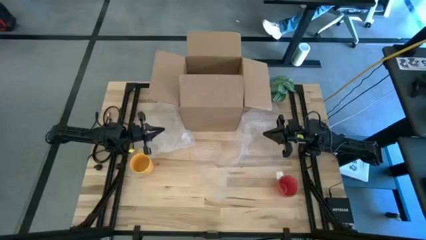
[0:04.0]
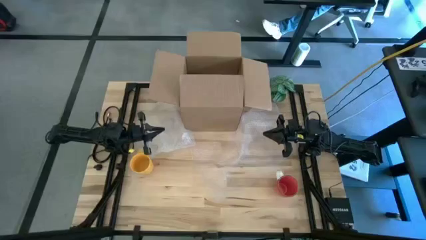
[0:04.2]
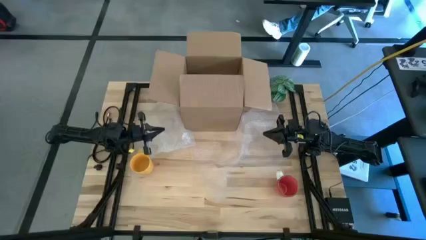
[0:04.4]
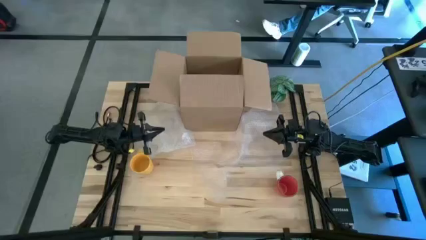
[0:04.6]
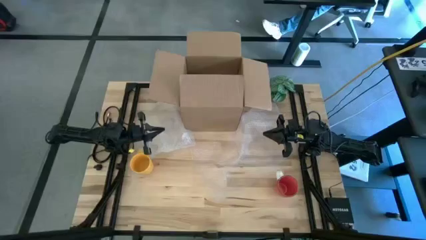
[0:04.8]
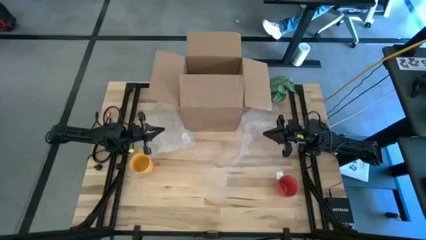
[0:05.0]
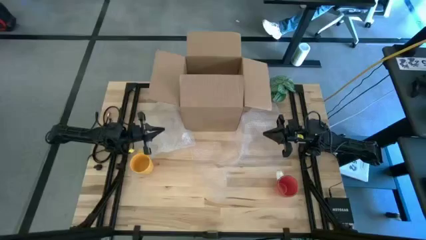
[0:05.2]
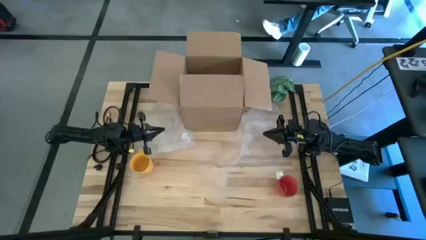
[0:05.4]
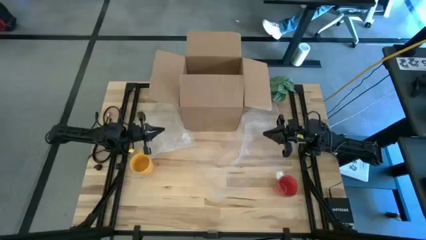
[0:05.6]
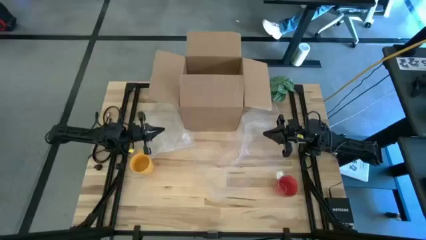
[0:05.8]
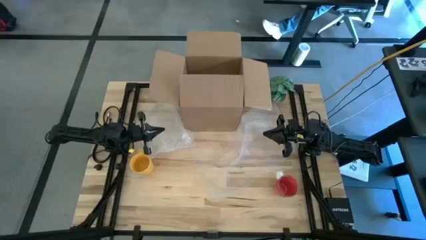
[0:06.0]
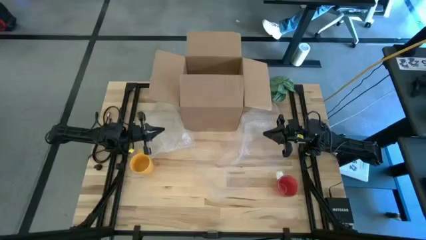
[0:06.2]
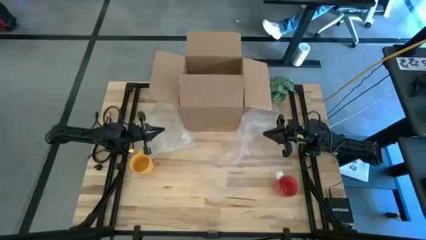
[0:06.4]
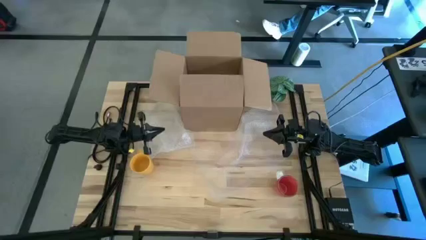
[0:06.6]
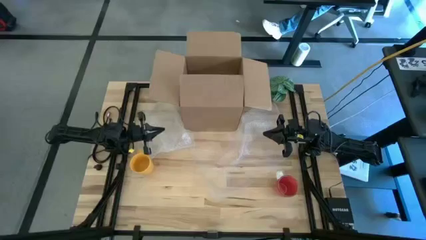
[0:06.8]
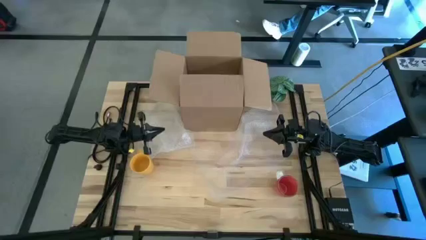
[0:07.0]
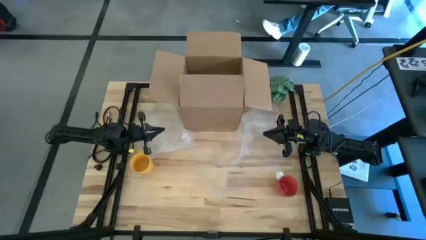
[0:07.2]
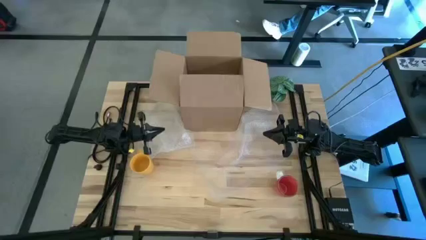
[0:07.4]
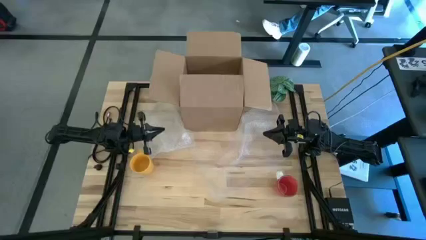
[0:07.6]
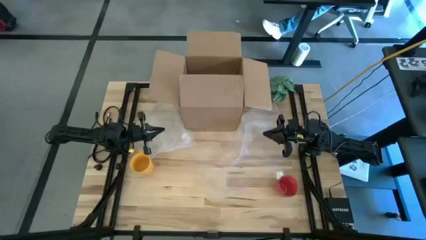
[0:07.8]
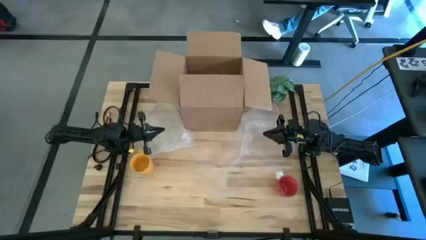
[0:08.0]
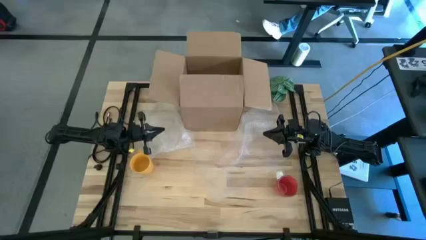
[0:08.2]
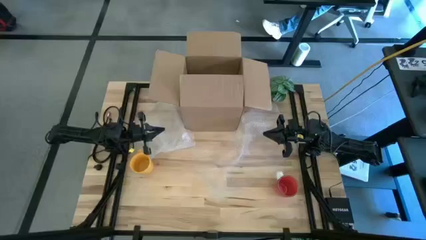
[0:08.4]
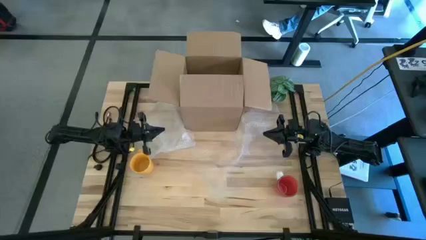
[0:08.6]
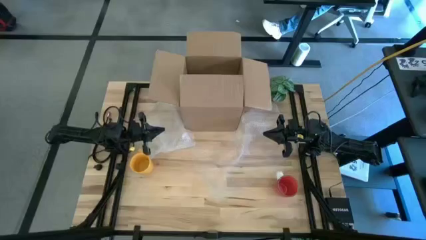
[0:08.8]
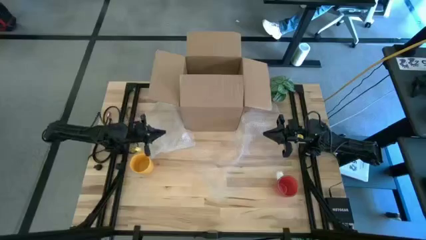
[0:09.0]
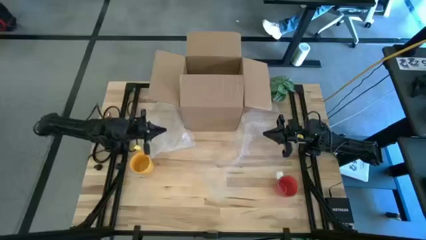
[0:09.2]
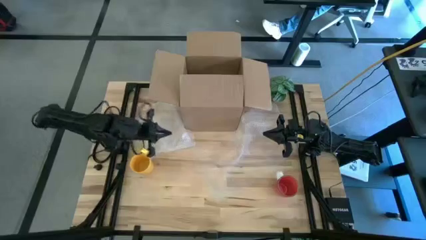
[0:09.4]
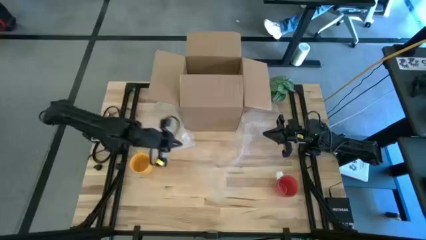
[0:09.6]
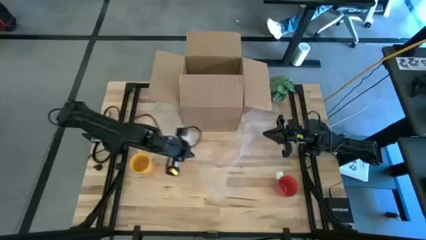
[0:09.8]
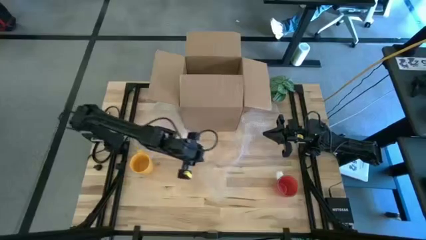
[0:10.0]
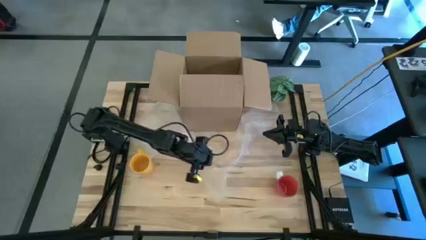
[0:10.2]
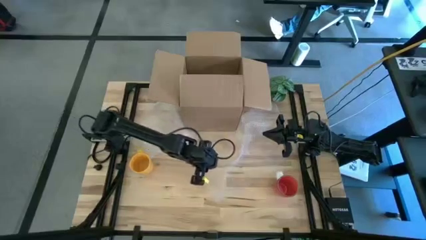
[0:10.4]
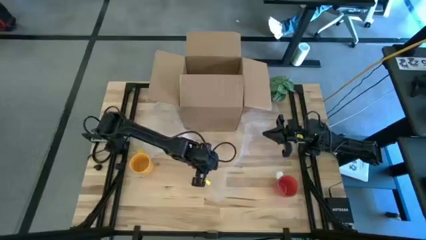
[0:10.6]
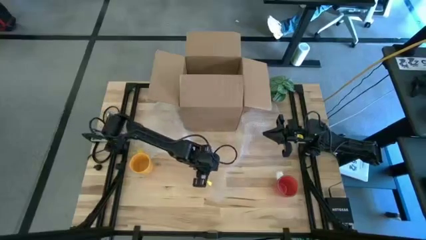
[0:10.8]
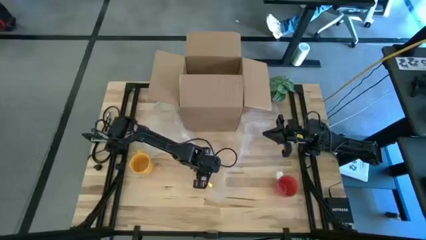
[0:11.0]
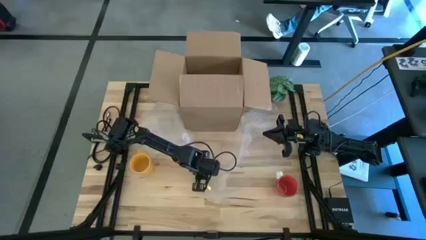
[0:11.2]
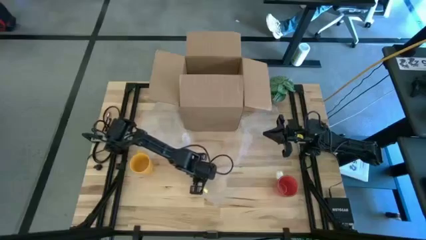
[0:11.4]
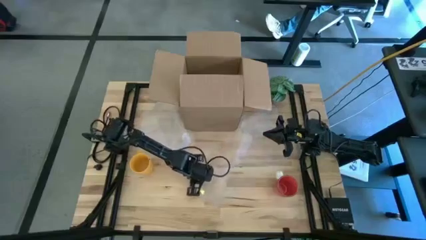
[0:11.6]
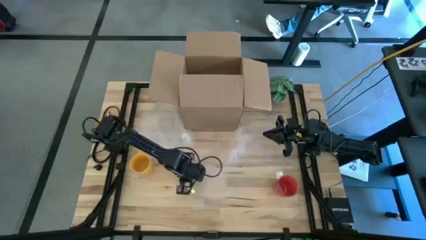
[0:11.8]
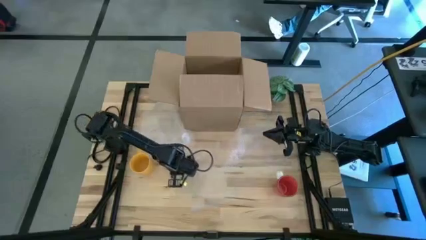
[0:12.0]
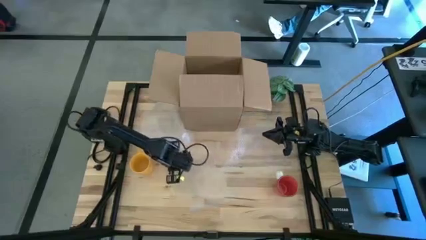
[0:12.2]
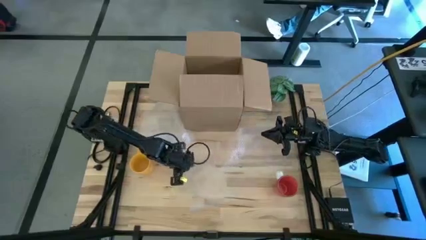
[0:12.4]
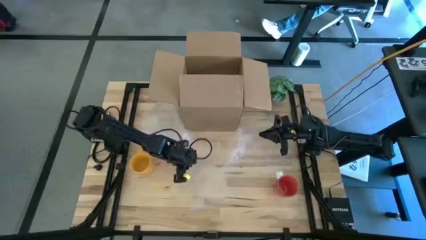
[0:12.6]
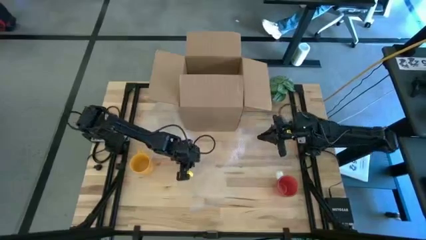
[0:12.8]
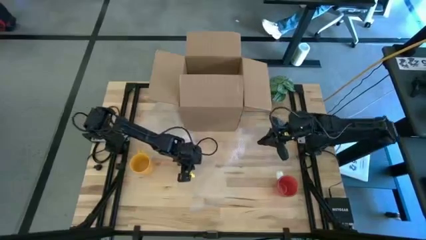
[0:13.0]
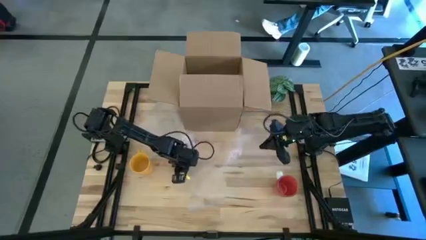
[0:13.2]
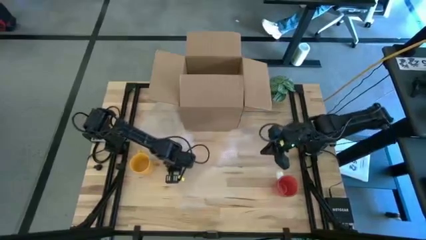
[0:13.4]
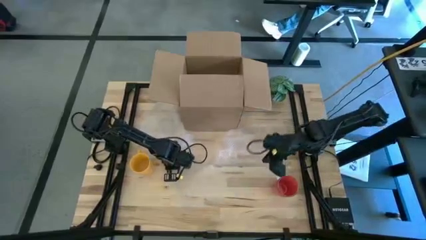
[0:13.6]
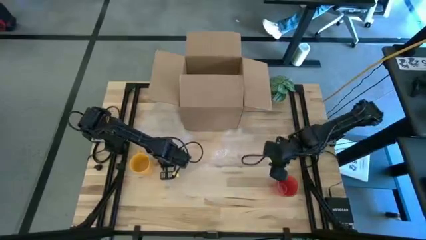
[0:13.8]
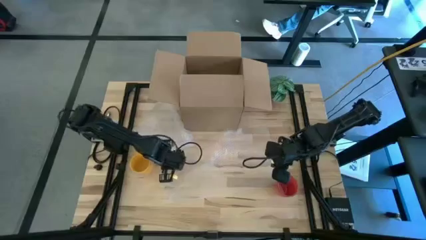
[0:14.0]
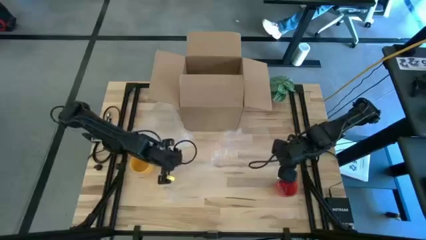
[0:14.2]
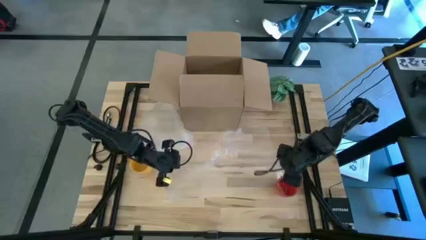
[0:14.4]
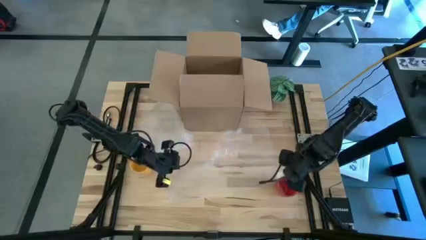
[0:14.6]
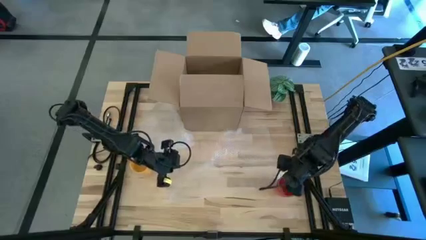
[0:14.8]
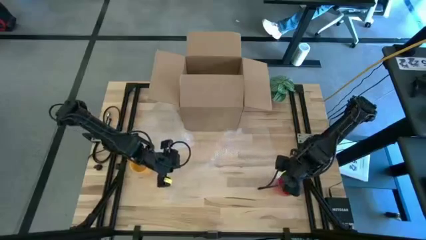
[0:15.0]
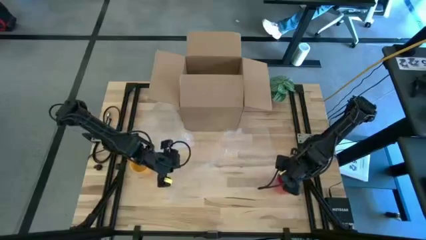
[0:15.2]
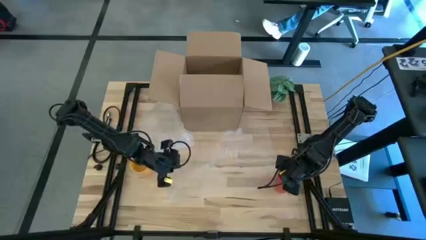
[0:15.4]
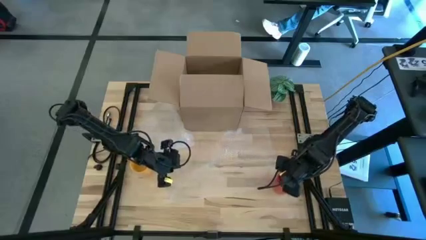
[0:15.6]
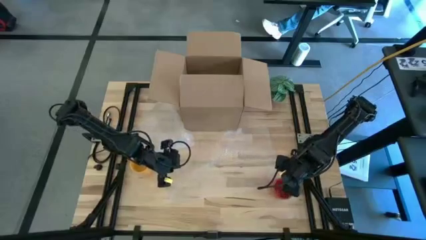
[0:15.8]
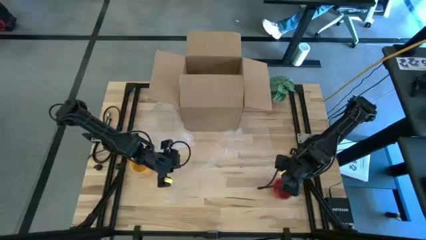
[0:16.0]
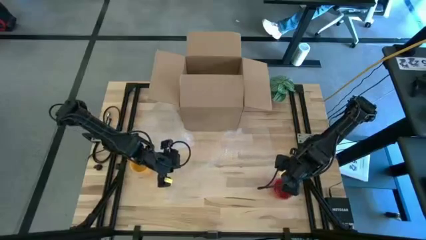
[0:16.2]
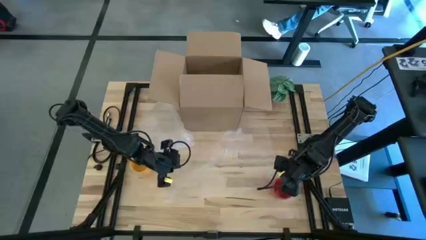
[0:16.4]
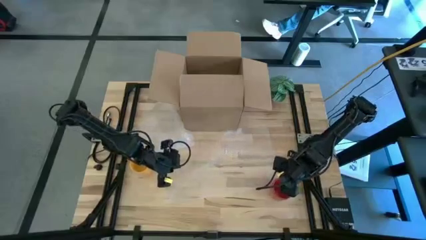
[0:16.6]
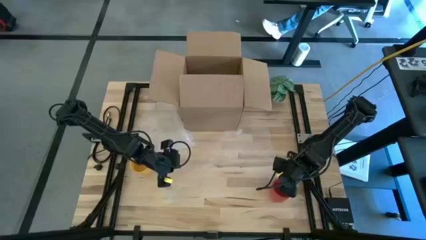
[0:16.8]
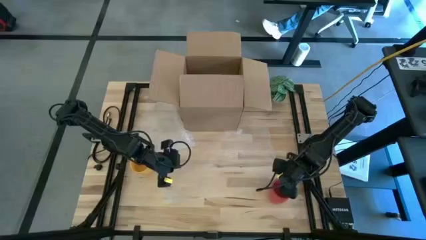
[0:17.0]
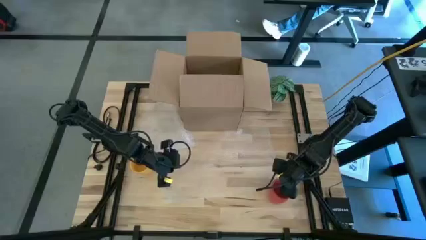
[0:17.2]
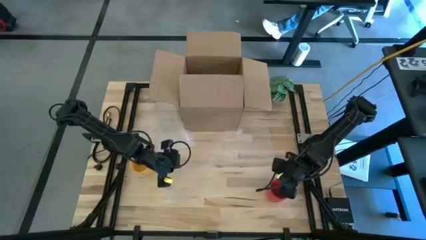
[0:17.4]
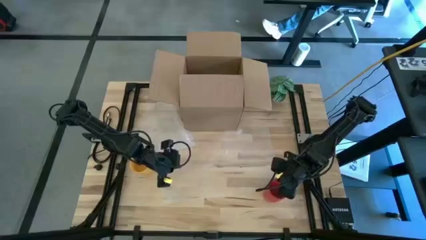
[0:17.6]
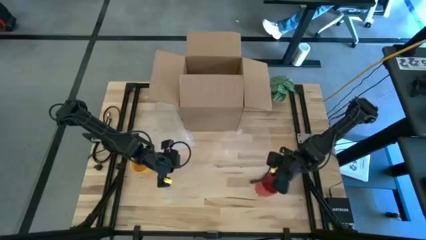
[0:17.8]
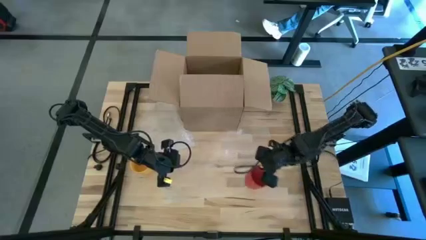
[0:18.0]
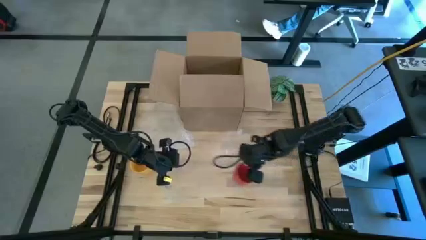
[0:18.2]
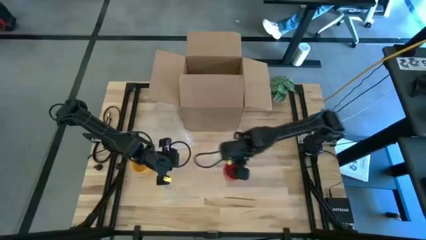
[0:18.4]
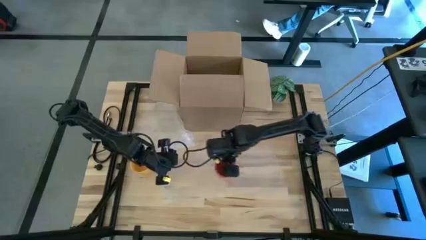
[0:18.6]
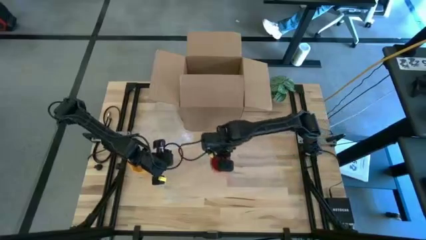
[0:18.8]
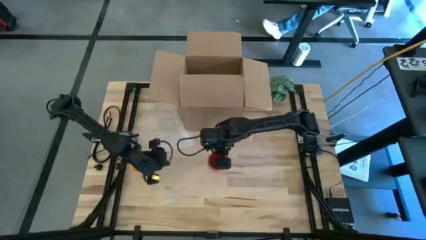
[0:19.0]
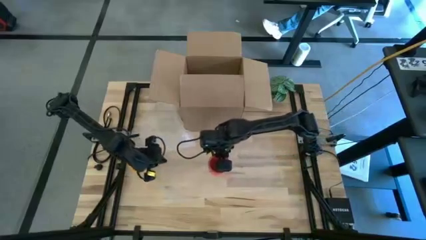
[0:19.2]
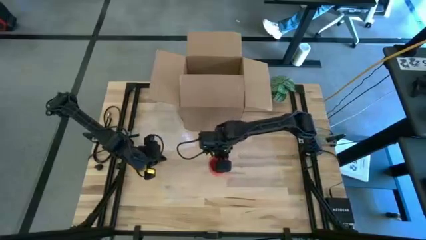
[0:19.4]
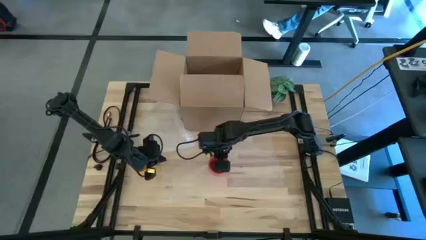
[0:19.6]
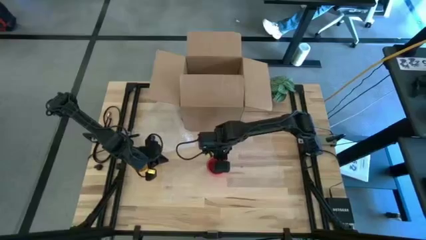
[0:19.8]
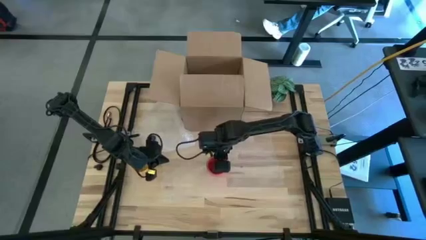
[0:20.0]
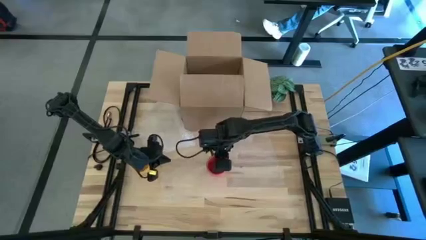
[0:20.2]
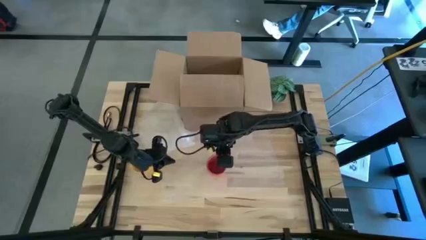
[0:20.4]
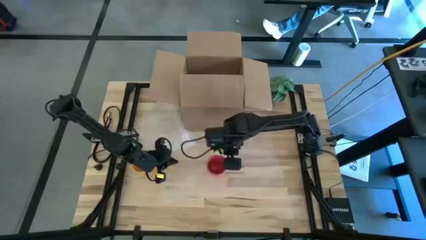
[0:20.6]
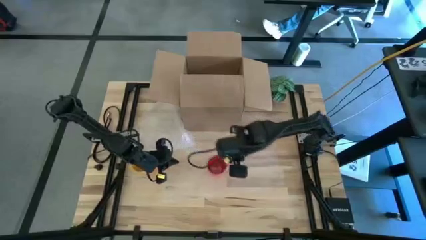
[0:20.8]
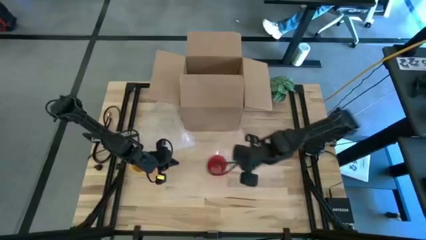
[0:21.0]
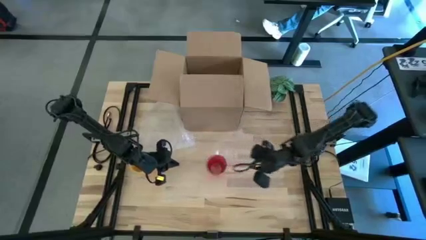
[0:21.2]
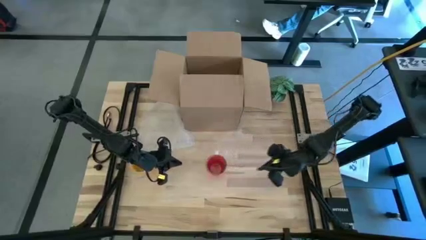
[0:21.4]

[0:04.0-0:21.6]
Task: wrap mug
Wrap the red mug with the bubble wrap
